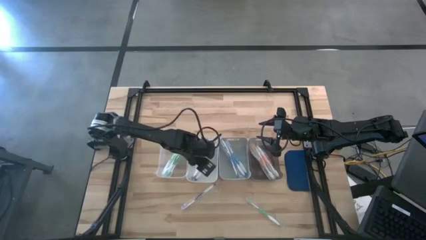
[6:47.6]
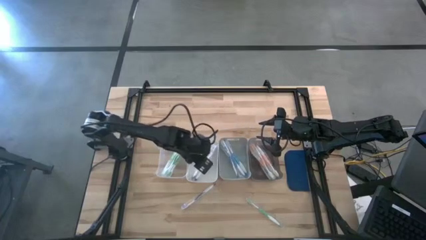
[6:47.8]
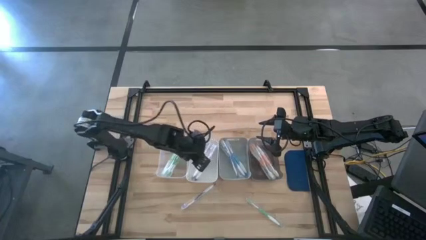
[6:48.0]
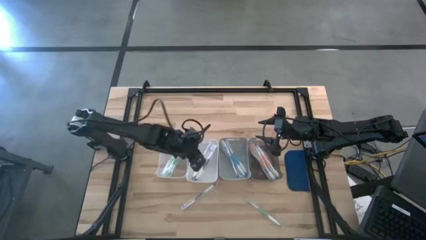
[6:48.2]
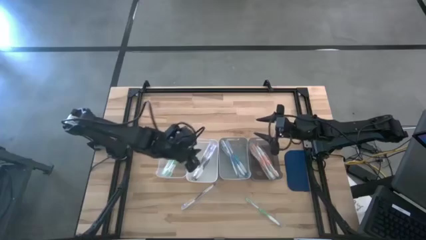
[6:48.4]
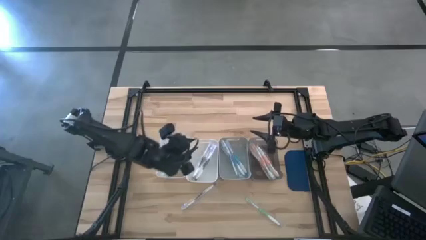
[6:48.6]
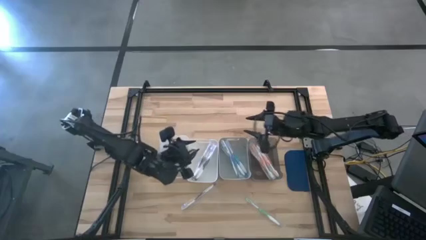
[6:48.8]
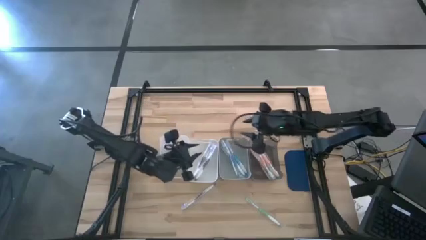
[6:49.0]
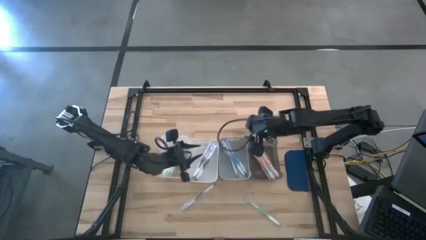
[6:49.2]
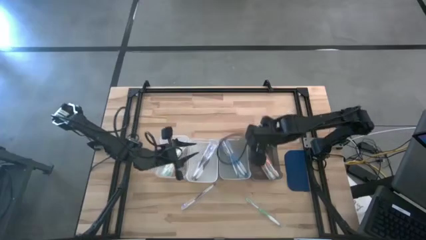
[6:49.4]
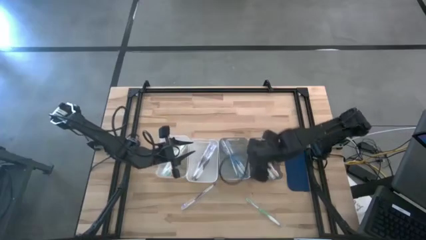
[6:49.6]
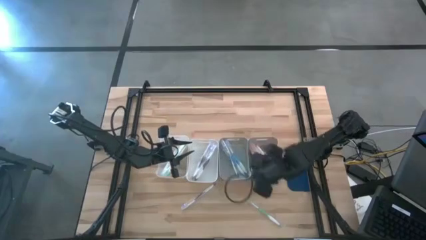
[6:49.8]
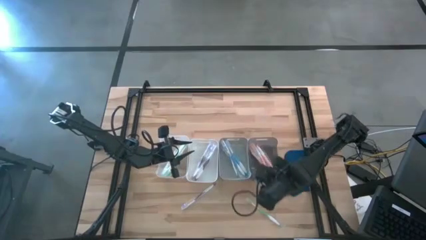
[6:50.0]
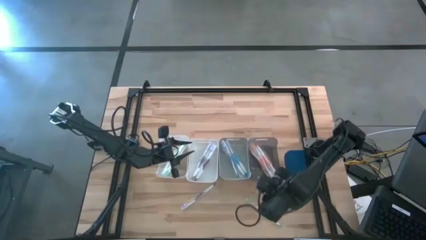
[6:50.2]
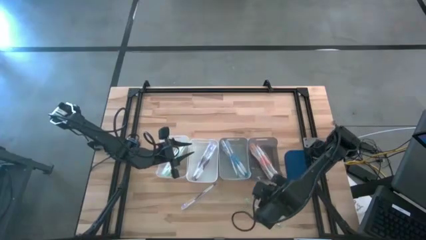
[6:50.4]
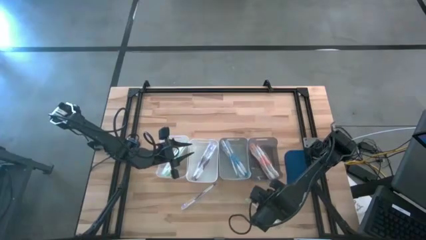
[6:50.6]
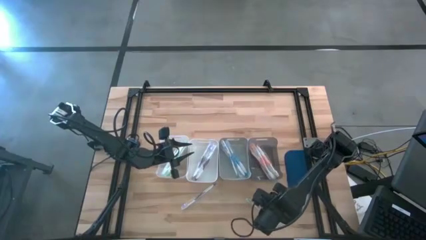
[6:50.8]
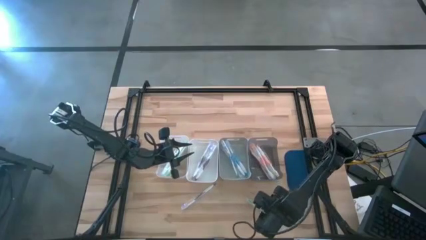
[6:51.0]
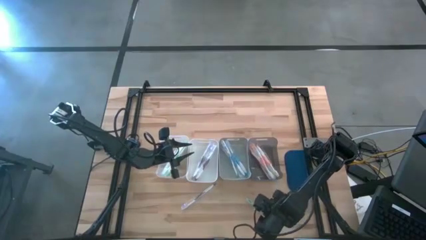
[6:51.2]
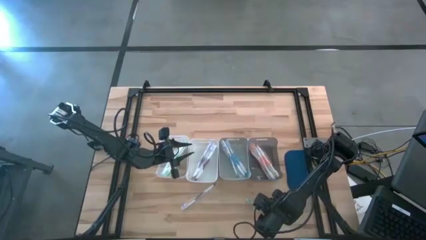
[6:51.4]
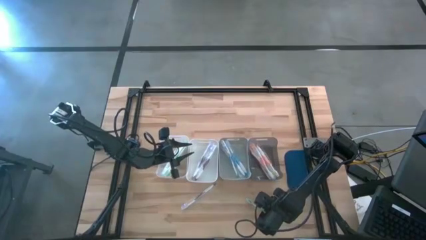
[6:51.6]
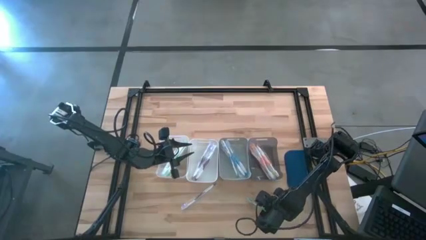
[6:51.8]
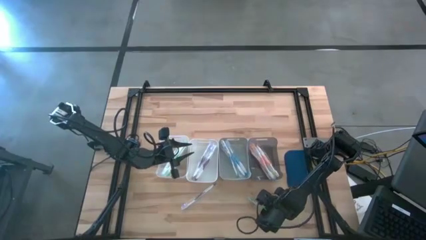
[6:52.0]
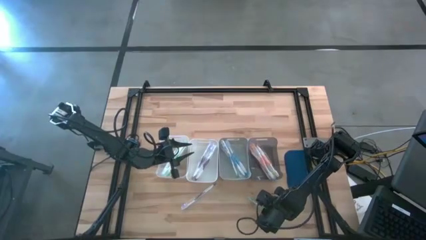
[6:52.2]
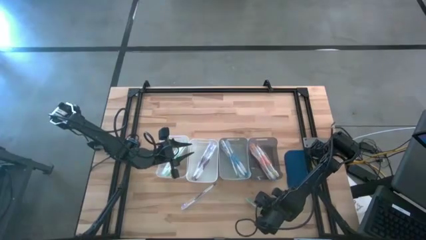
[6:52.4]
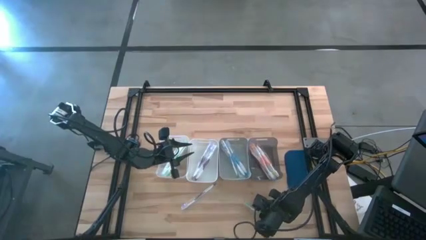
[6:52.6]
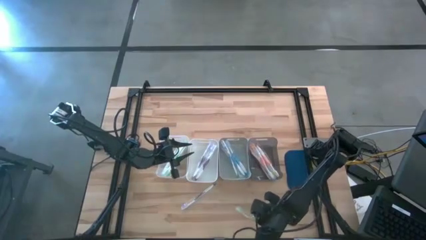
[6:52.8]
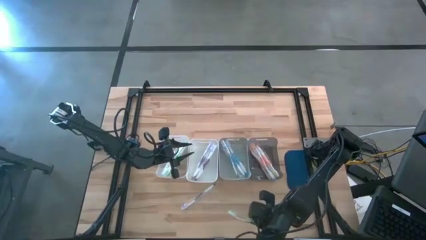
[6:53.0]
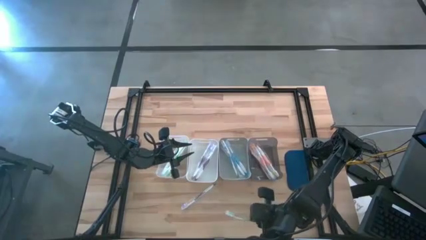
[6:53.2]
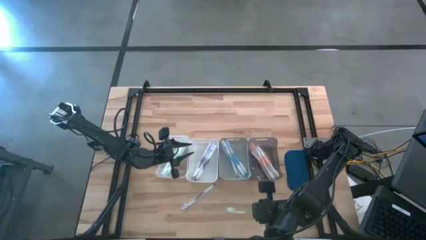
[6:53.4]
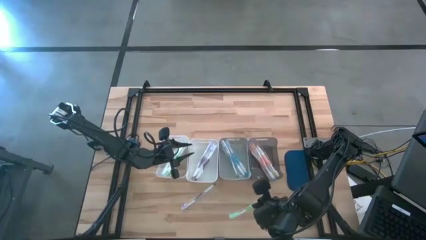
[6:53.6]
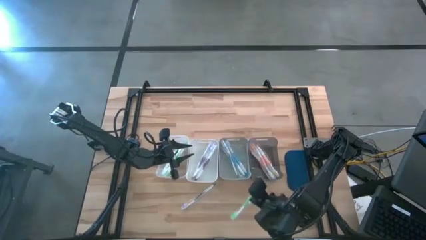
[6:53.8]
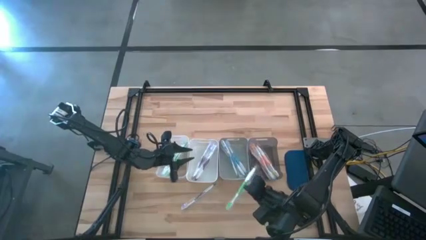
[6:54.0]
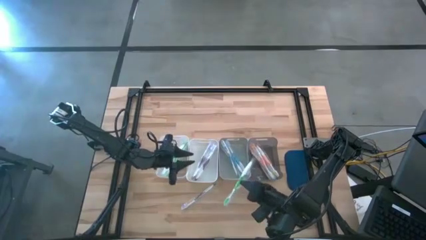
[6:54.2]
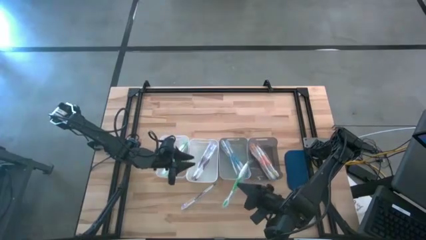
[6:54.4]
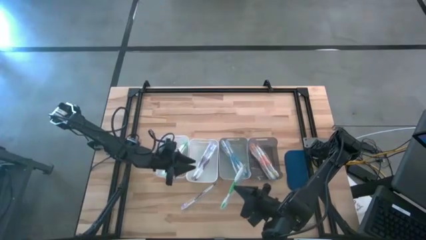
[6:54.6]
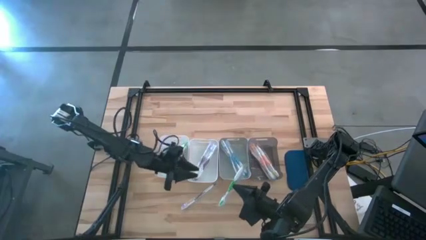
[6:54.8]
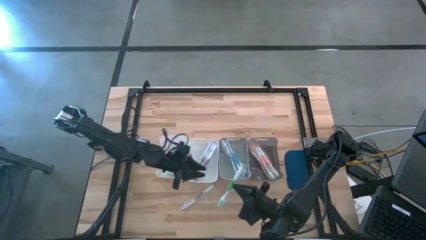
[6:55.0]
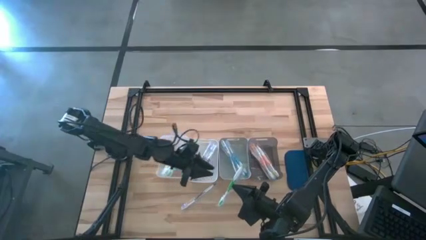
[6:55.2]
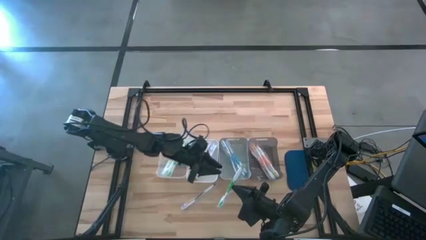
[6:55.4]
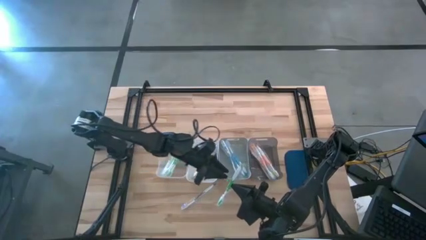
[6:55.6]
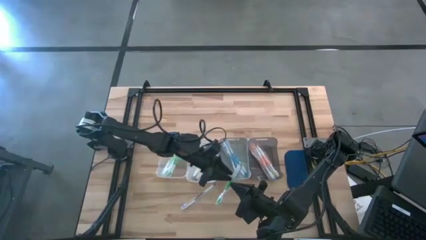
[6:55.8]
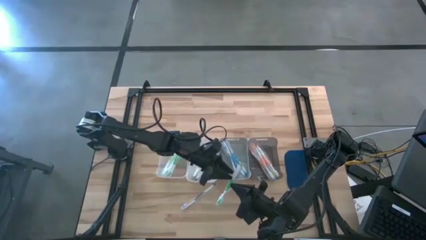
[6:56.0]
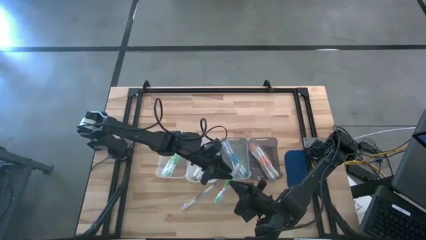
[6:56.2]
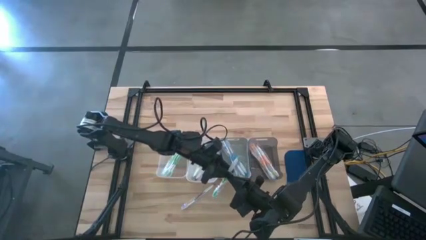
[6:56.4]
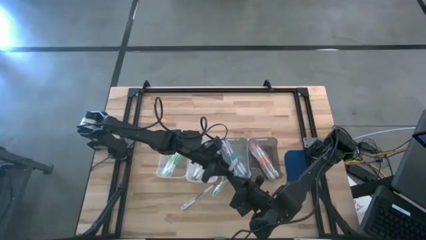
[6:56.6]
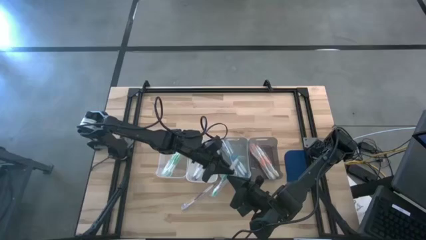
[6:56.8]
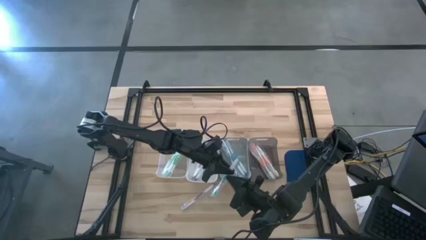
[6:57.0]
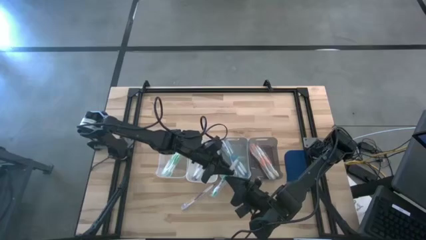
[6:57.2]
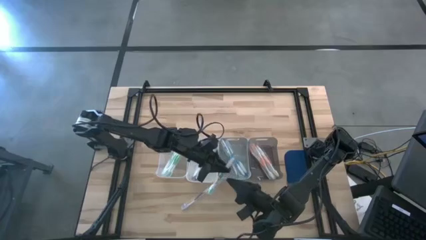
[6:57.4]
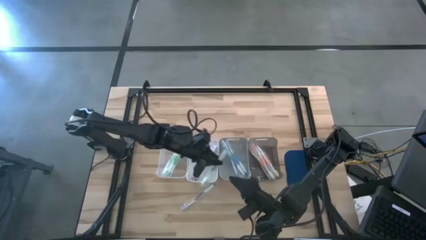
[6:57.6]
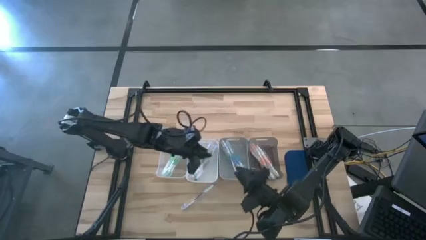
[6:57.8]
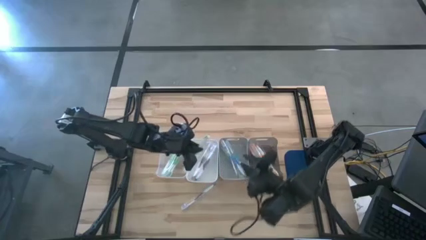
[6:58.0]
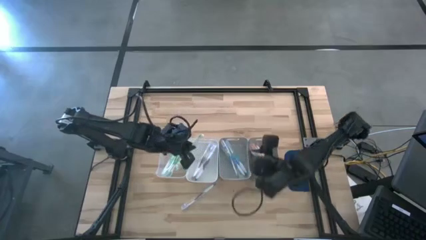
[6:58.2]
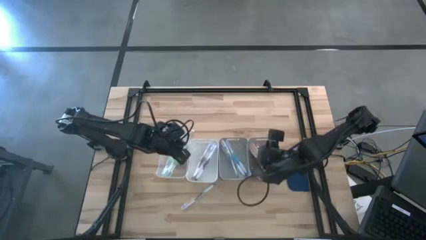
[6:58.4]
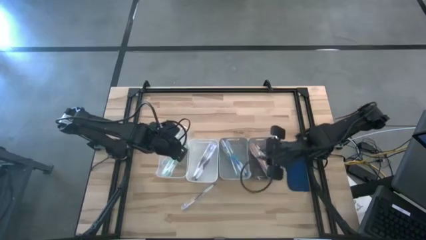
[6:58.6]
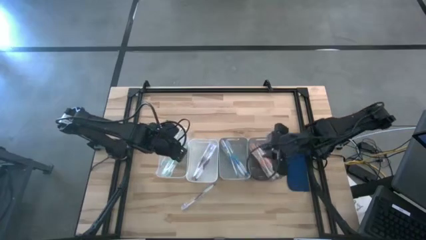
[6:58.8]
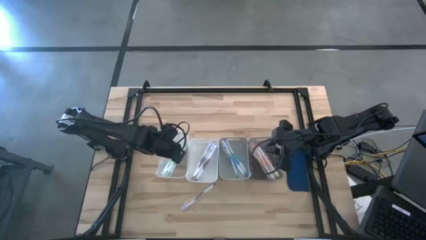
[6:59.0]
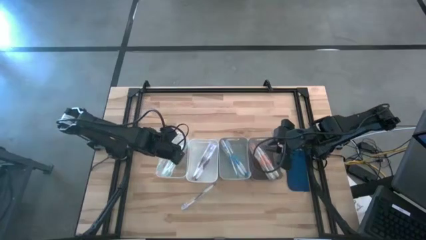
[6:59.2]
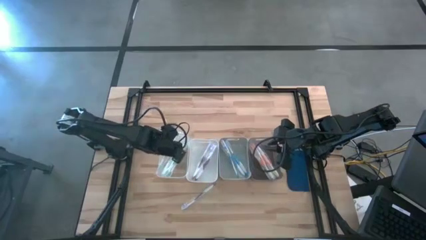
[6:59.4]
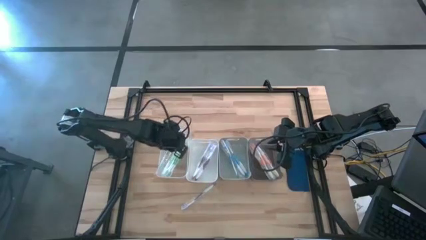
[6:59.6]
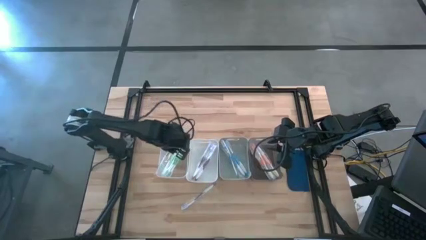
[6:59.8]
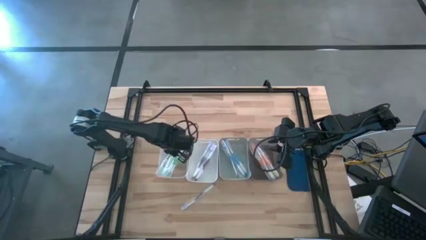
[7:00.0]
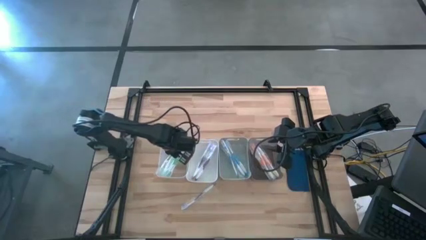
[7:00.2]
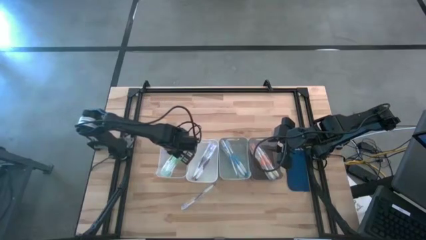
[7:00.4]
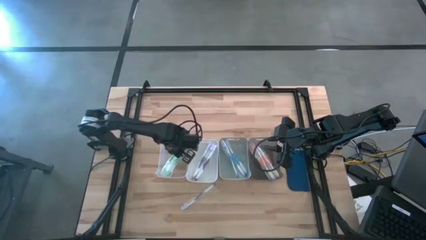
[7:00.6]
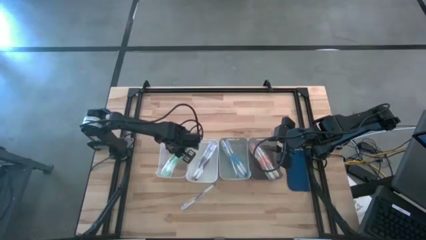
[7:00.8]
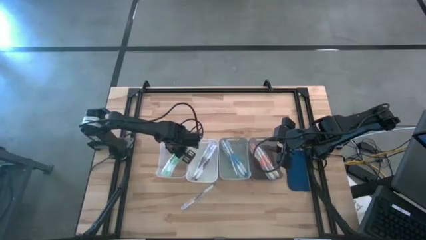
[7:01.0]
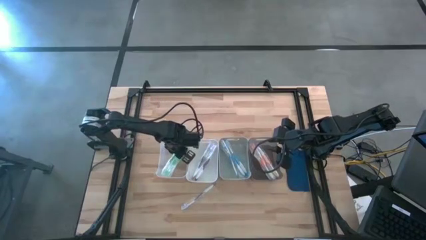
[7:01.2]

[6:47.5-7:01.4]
Task: Pick & Place Toothbrushes
Put the green toothbrush into the transparent bin
